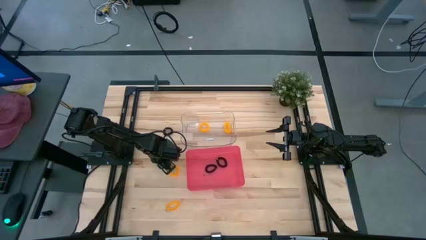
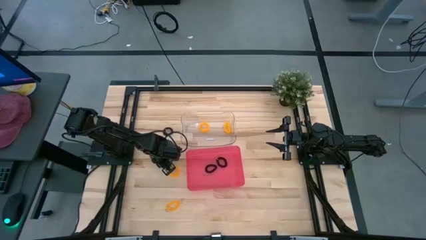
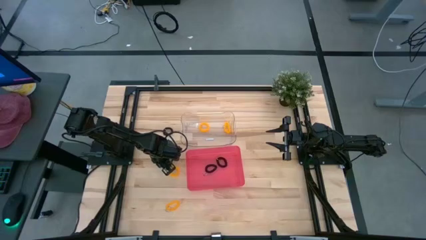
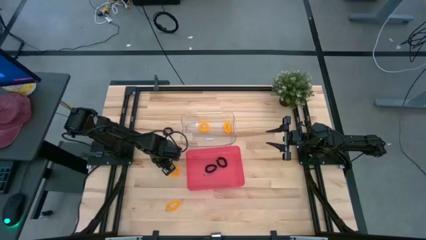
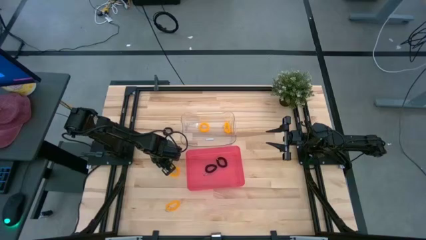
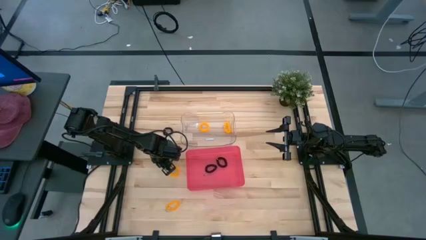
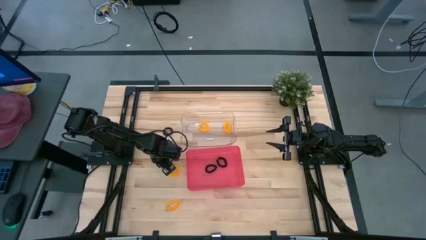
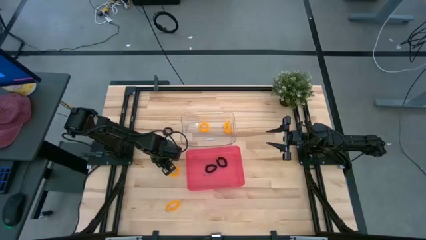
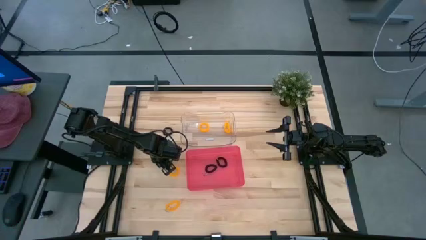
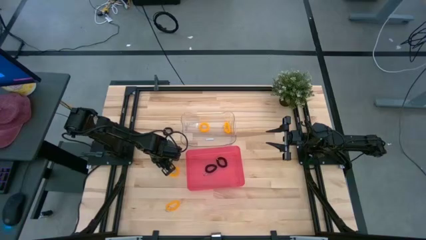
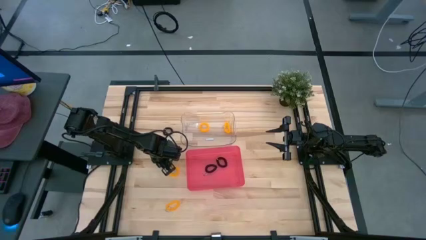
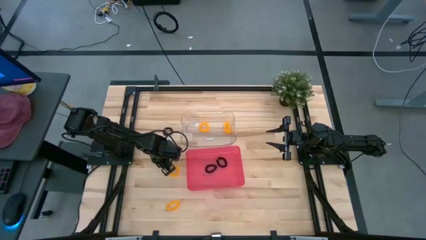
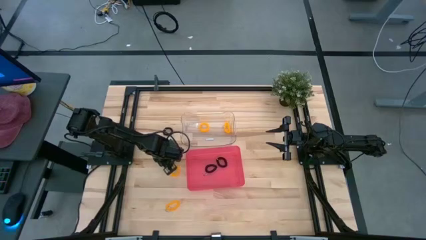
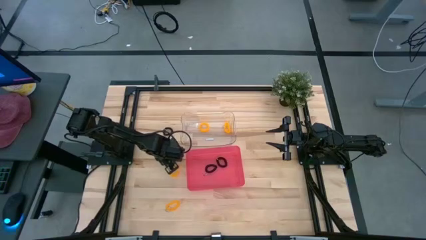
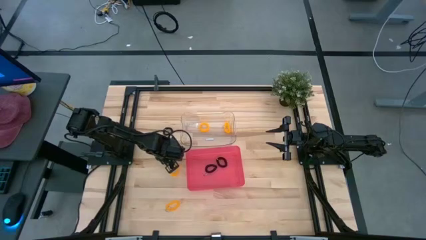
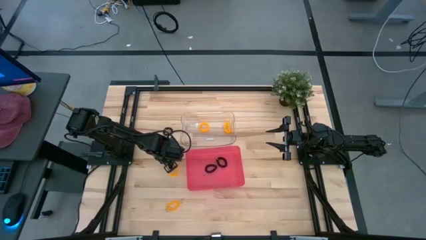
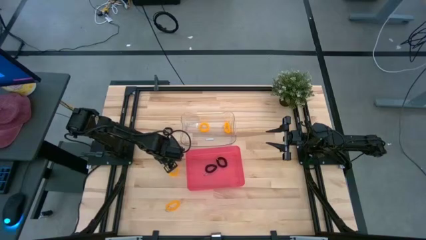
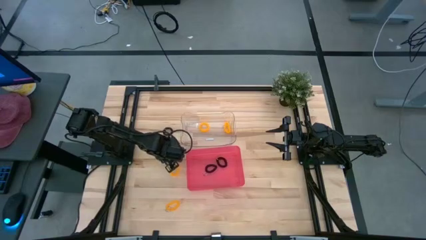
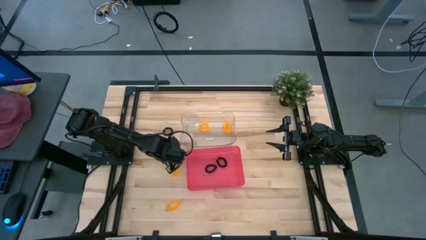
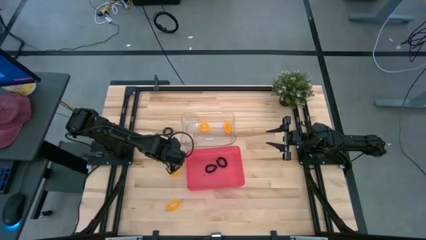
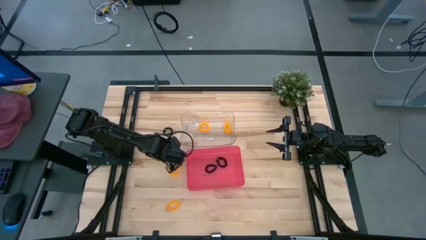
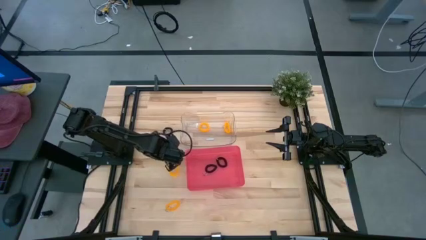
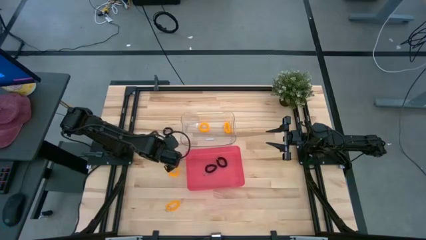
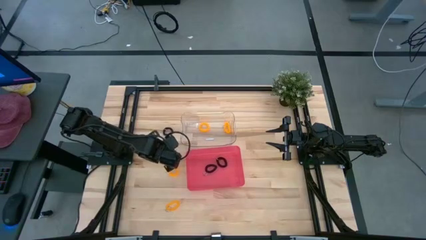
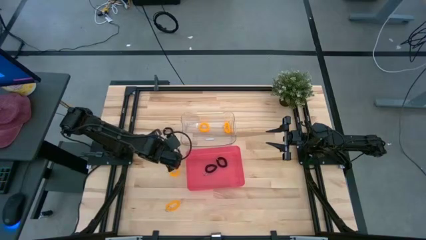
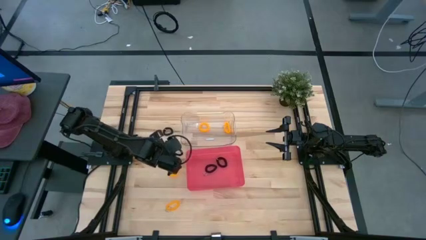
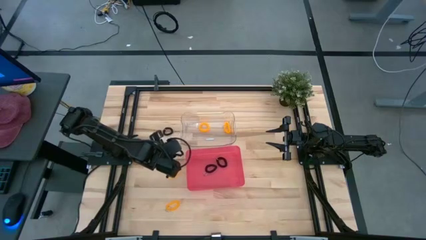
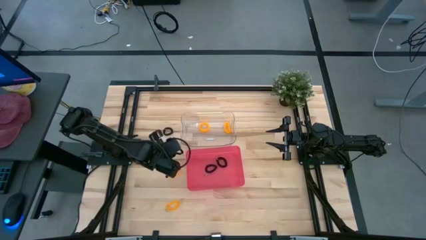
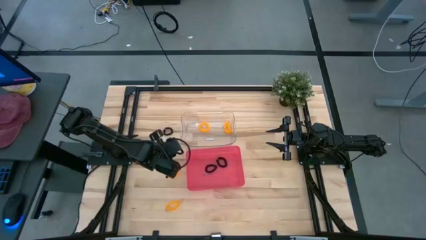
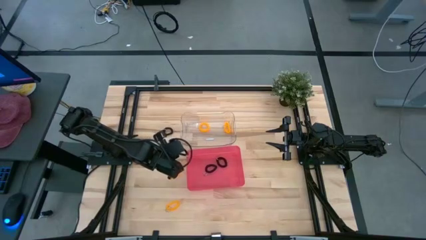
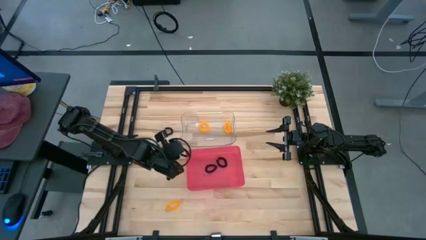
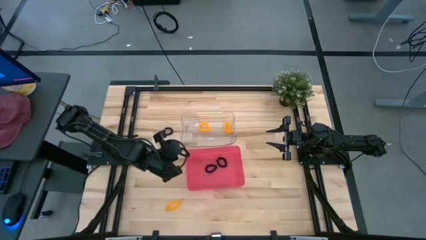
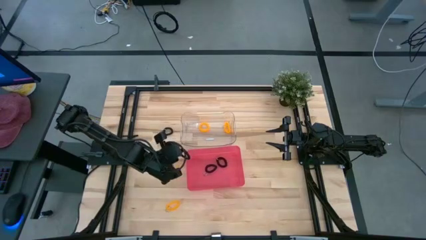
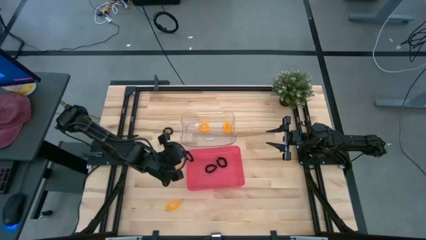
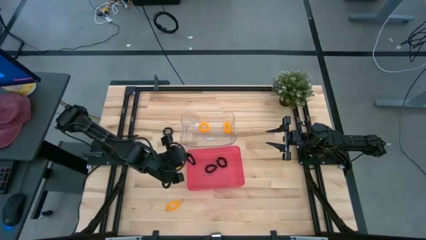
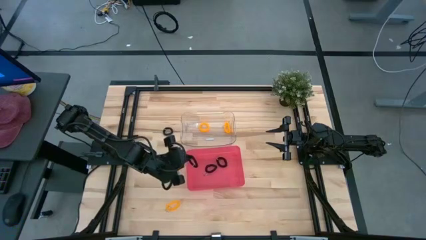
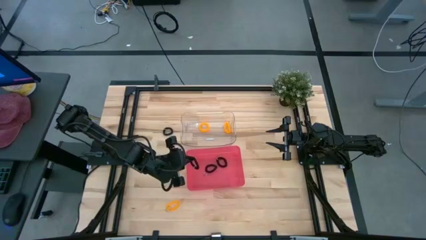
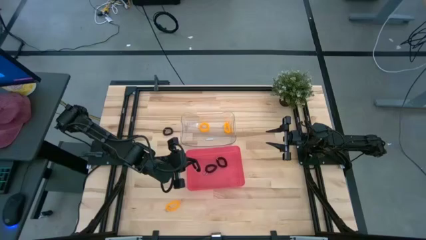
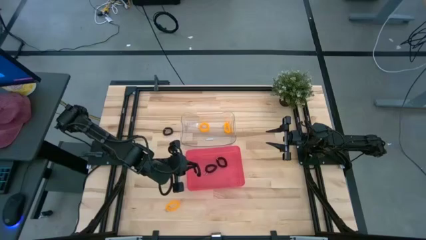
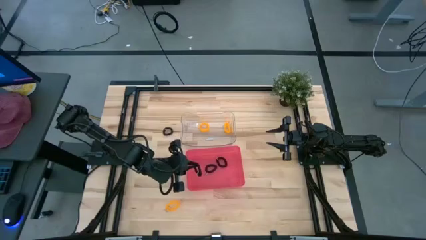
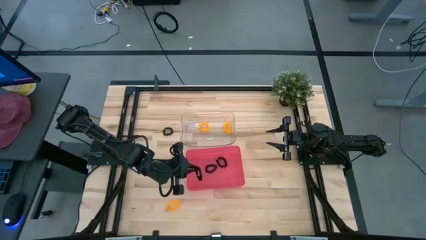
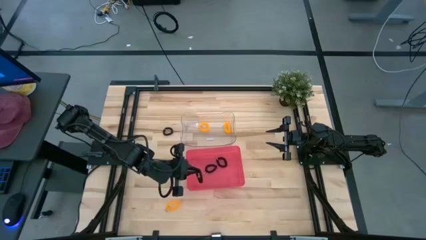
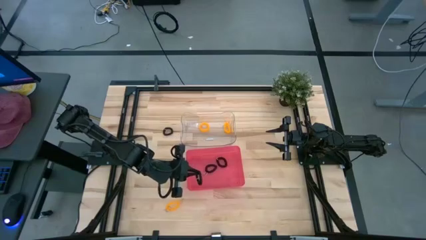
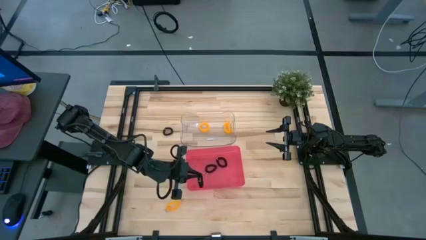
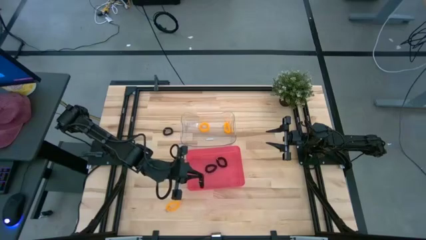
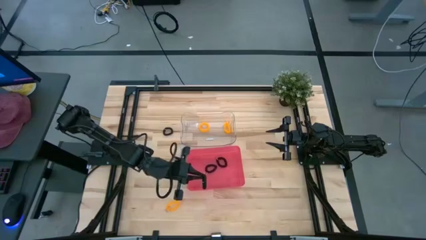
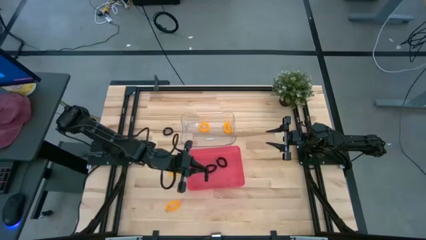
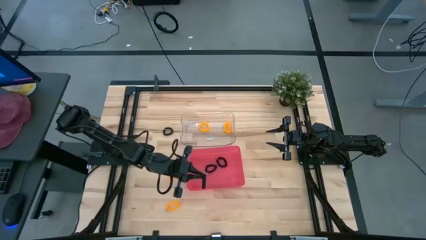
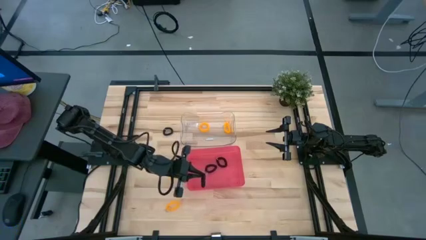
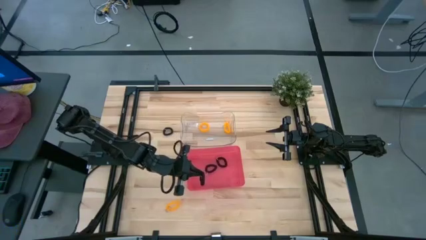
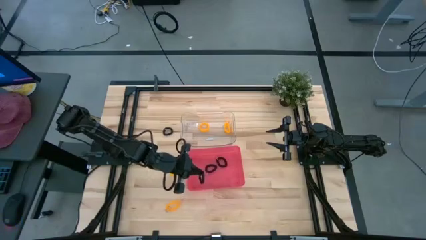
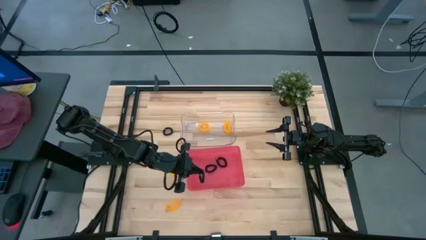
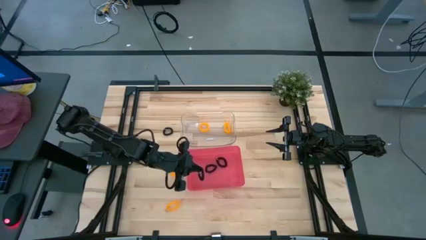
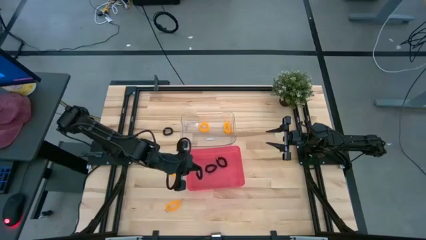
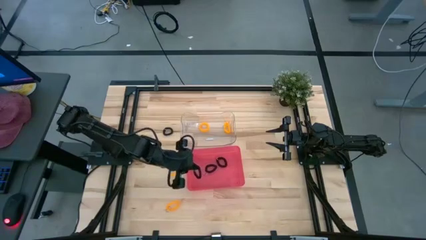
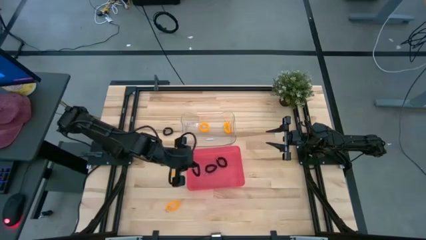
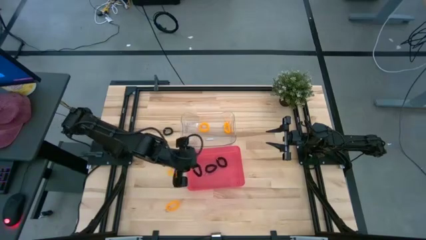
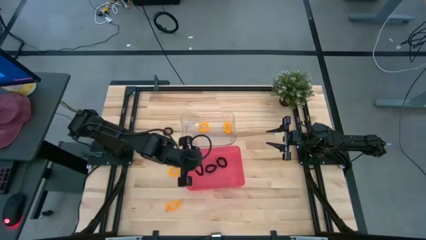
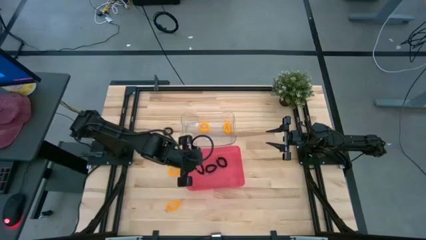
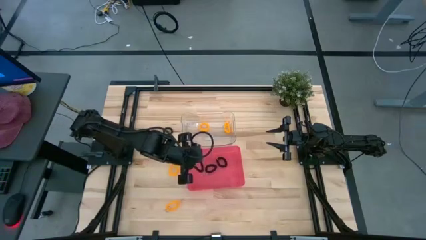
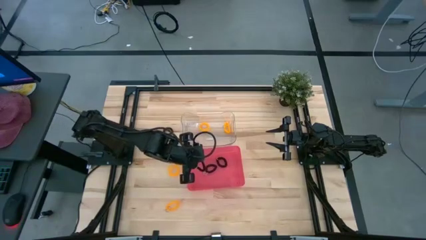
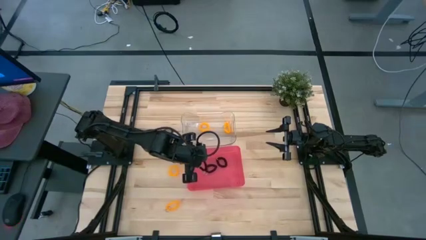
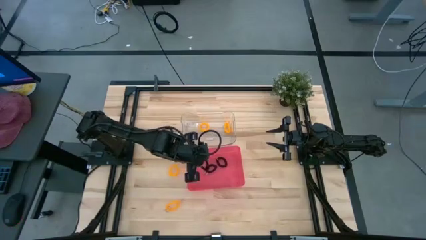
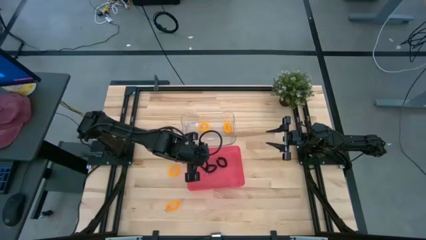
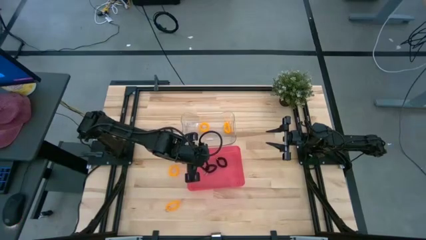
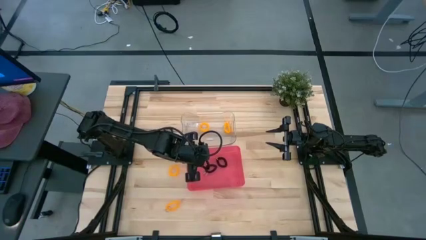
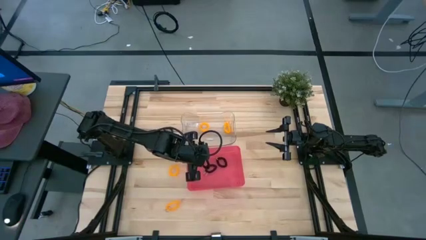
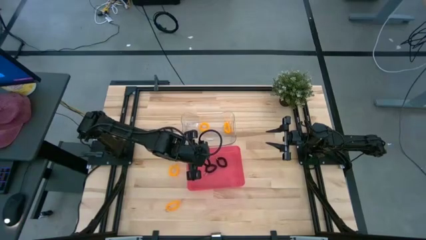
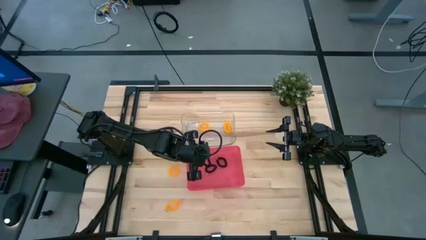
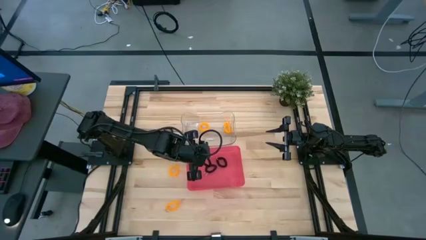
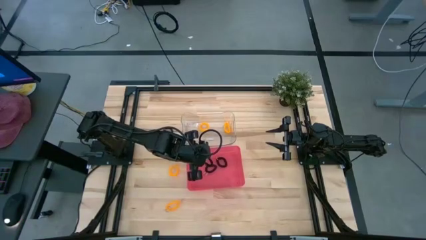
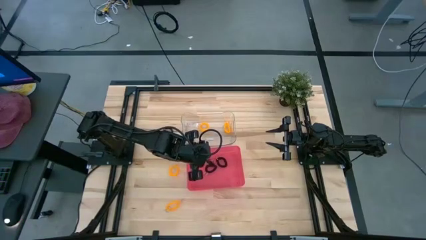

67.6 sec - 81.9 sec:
Task: Sort spring keychains
Put the black spring keychain into the red bin

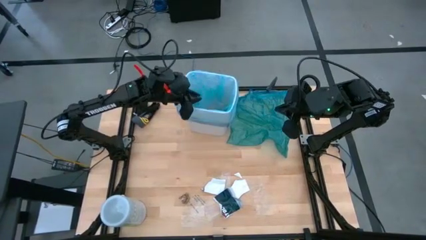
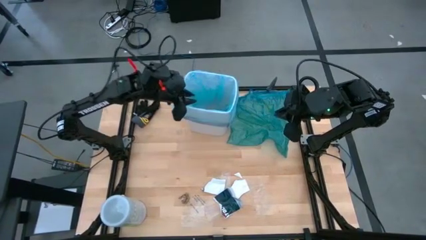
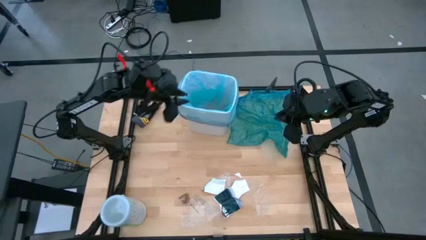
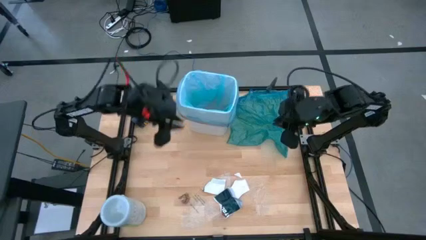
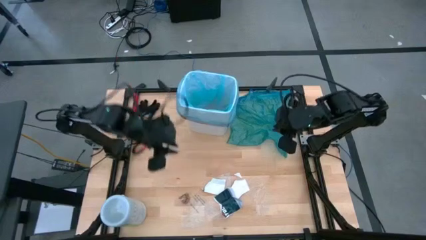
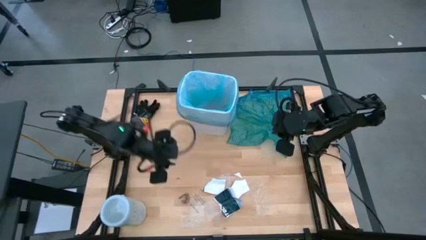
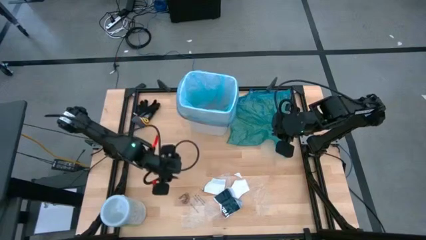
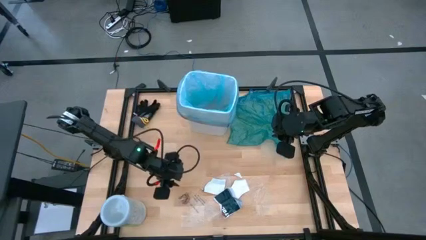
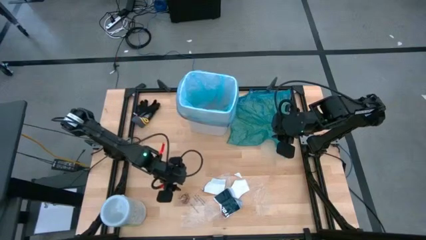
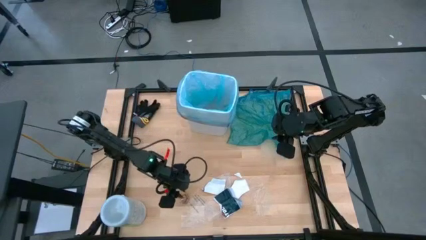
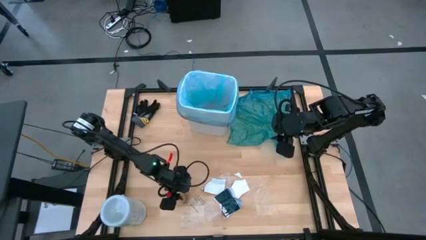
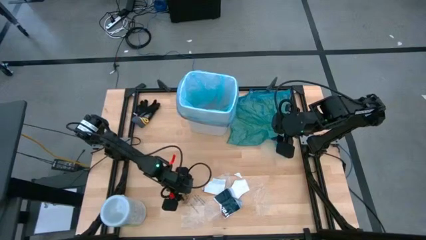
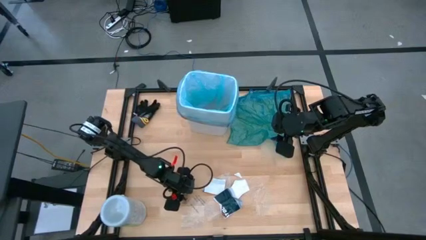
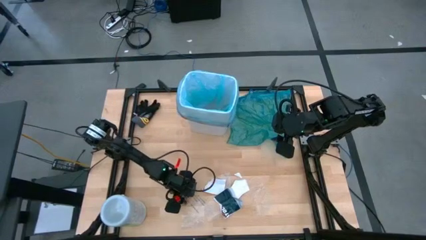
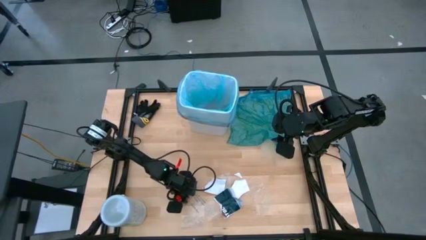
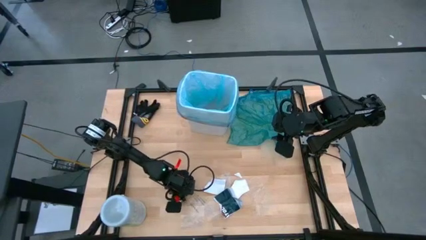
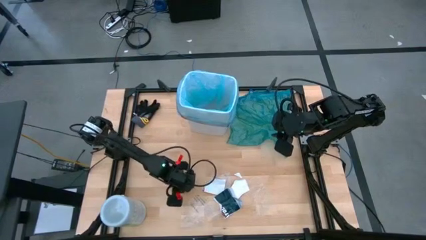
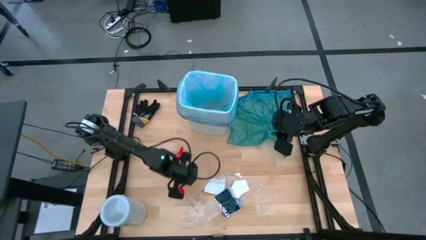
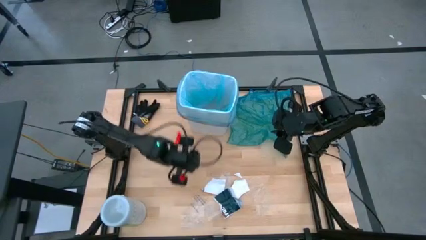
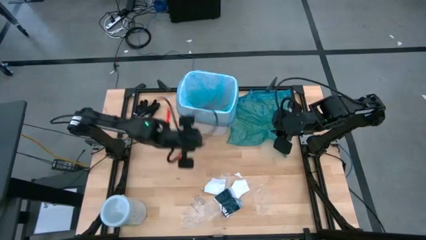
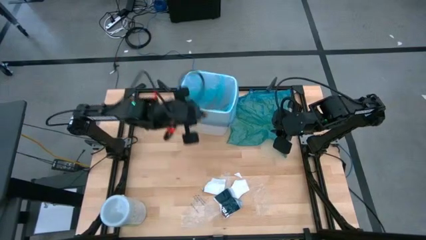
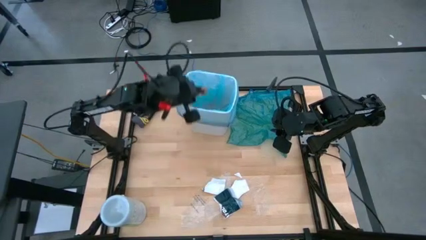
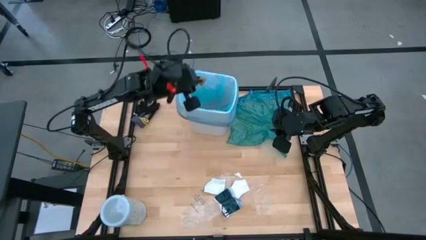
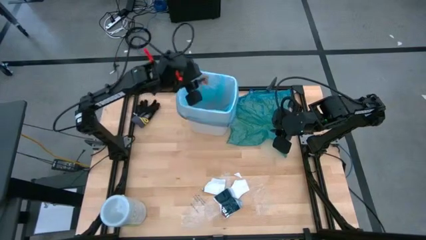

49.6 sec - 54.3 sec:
Task: place trash/remove bag and relplace
Put the brown paper into the trash bin
